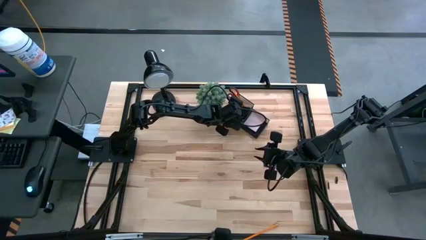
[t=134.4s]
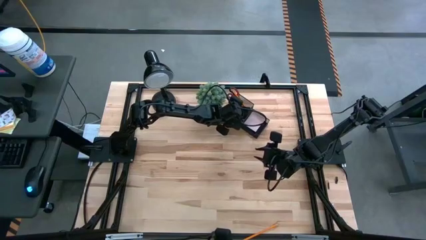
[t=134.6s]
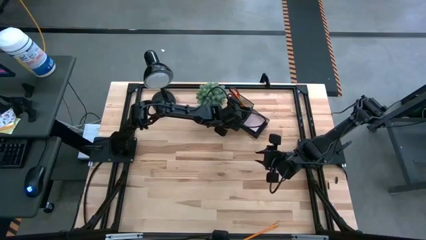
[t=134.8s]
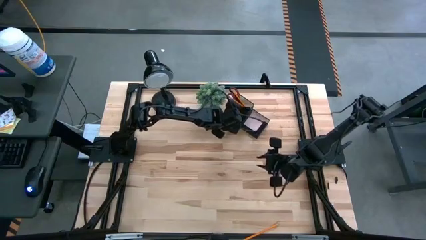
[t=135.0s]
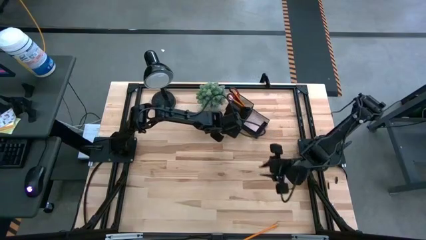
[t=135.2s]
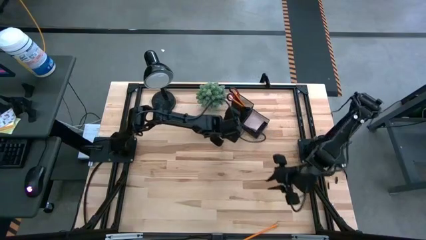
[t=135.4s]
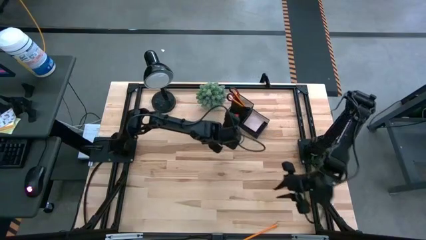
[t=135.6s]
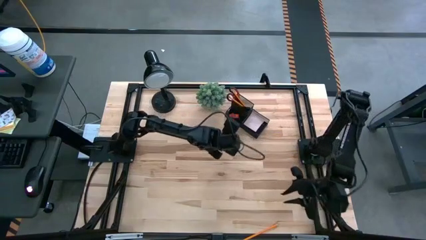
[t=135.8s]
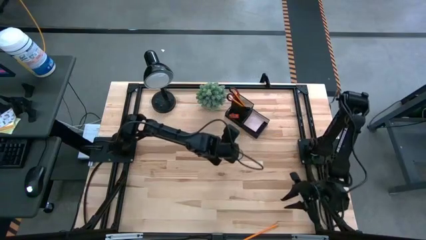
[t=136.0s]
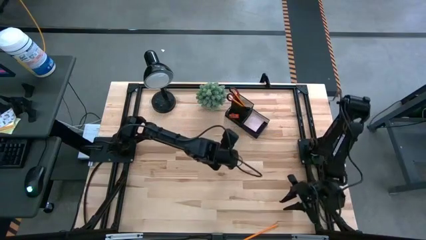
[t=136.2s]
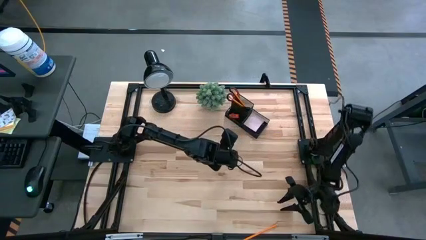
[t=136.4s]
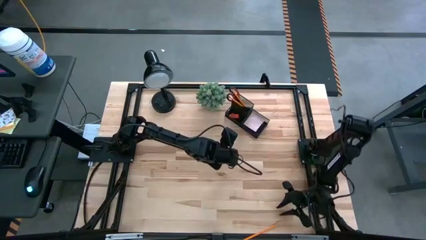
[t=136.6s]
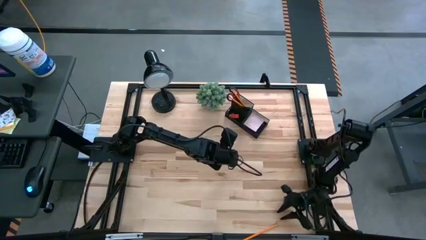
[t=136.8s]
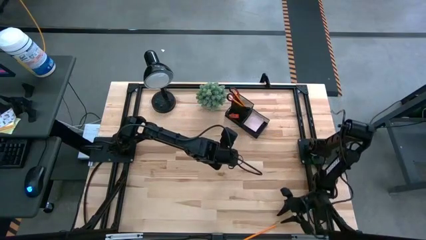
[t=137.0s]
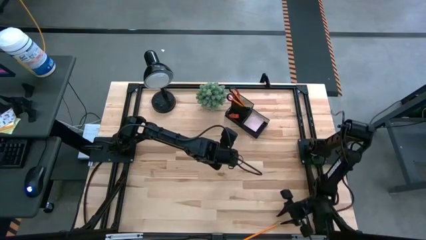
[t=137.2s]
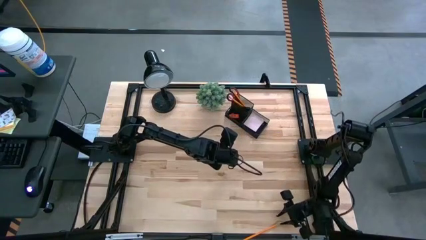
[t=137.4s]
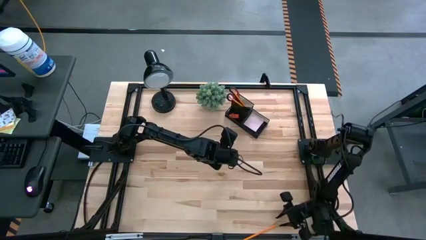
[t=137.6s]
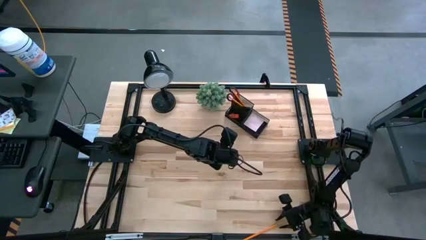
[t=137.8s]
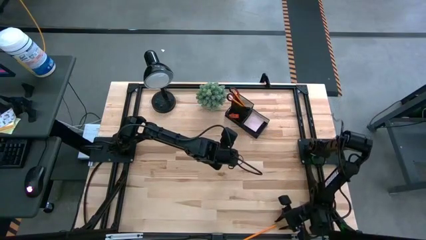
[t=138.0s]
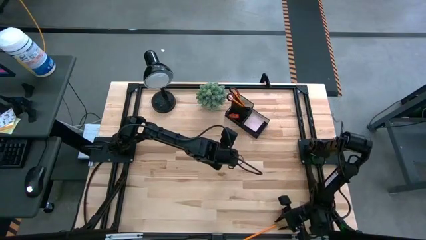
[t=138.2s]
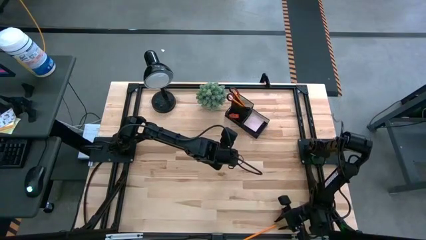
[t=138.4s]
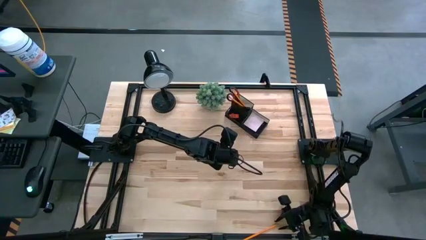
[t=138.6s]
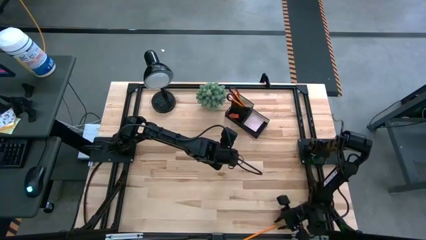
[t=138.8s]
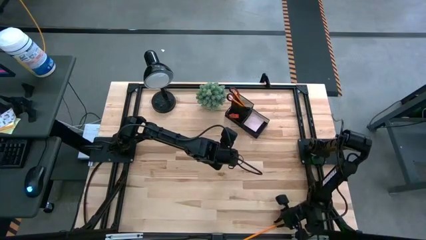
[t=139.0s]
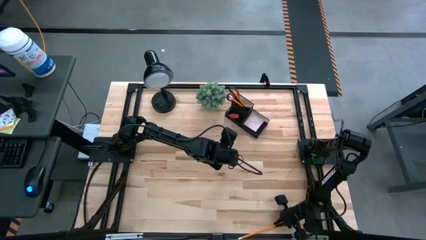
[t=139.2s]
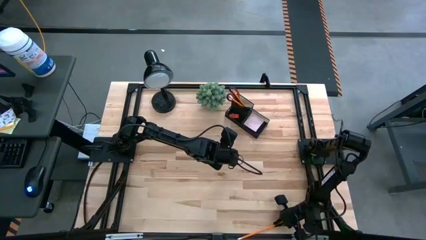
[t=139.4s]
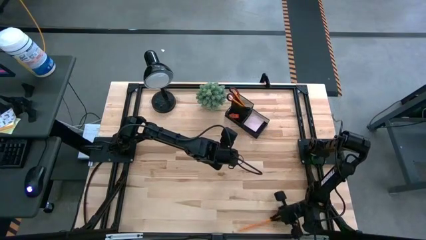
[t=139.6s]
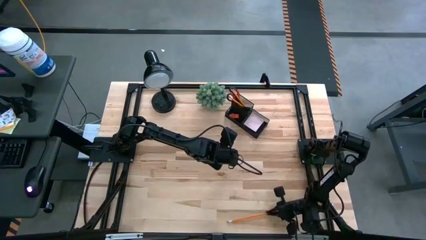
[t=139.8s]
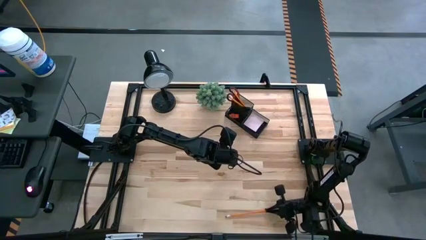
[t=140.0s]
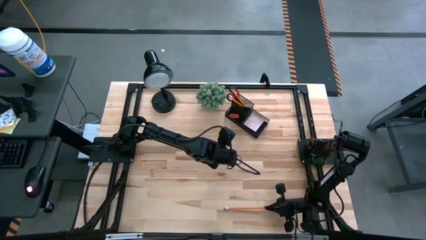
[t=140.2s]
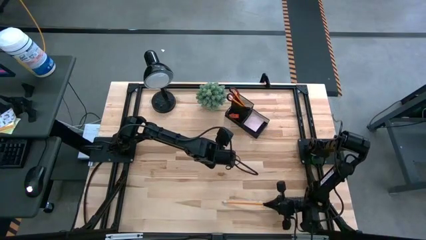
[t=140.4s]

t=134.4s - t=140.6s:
Task: Pick and place office supplies into organizer
Put the yellow pencil into the black desk organizer

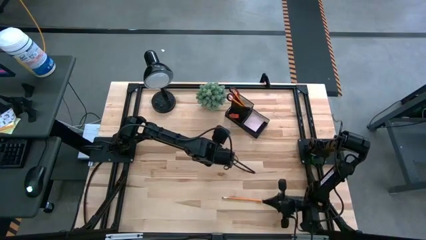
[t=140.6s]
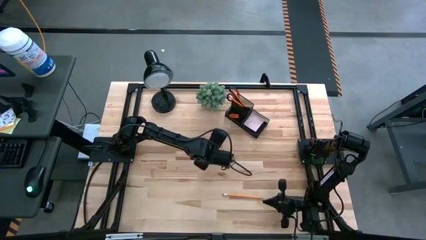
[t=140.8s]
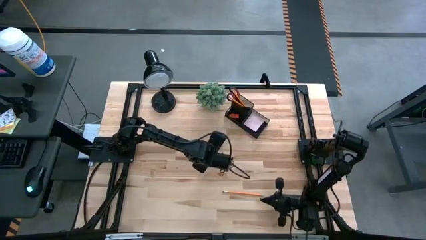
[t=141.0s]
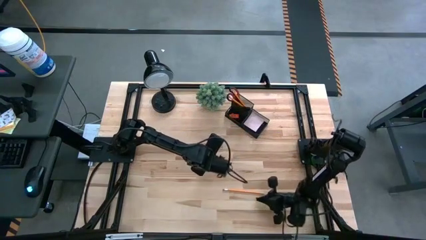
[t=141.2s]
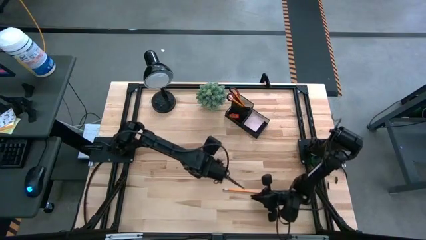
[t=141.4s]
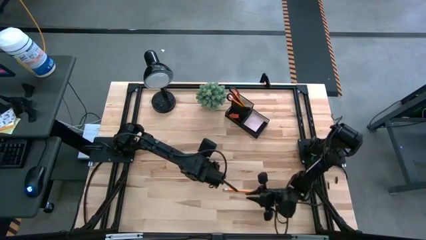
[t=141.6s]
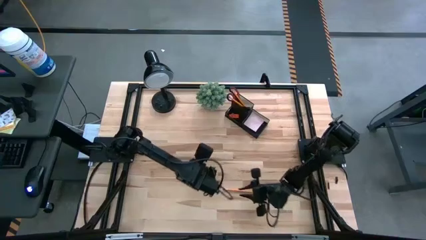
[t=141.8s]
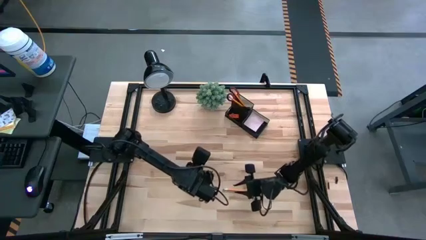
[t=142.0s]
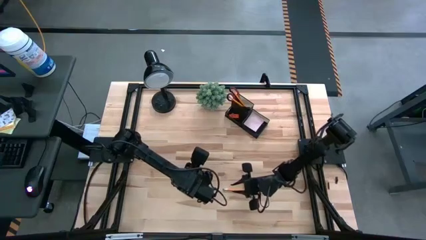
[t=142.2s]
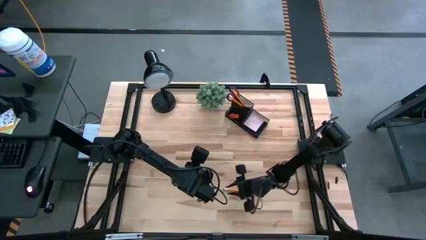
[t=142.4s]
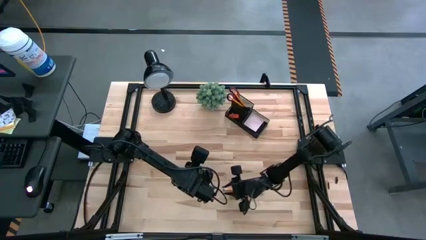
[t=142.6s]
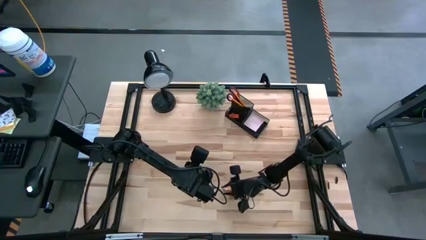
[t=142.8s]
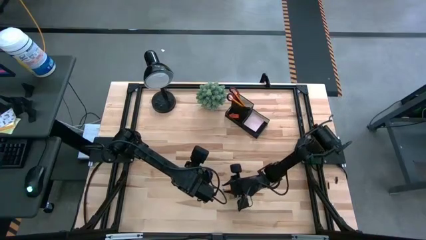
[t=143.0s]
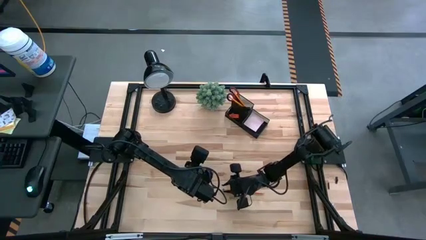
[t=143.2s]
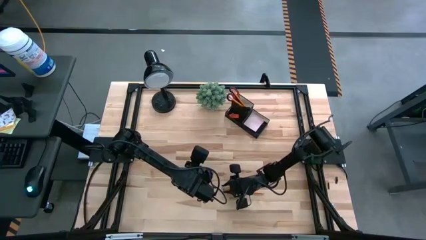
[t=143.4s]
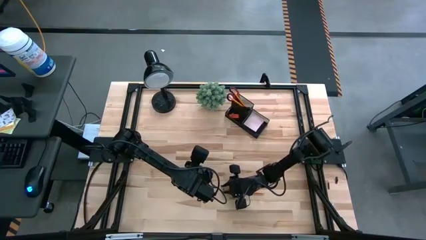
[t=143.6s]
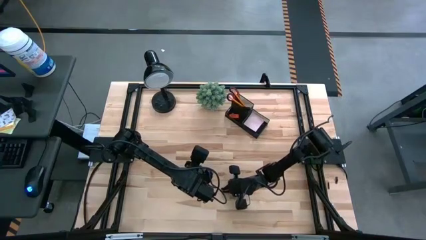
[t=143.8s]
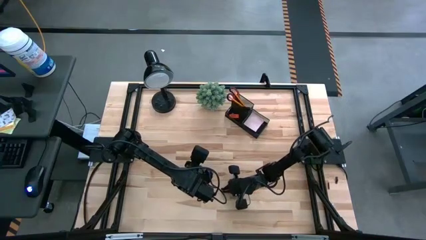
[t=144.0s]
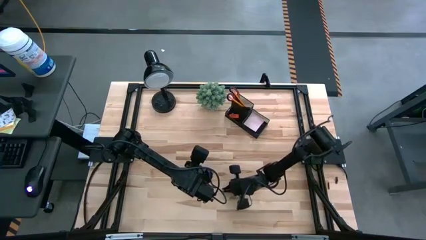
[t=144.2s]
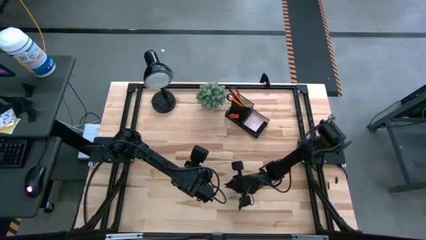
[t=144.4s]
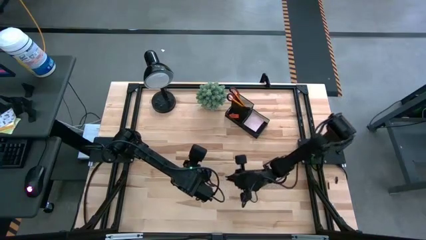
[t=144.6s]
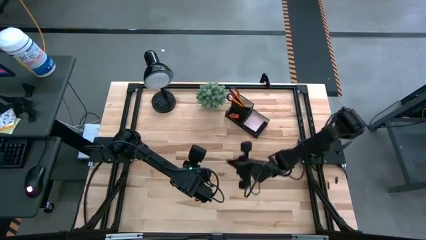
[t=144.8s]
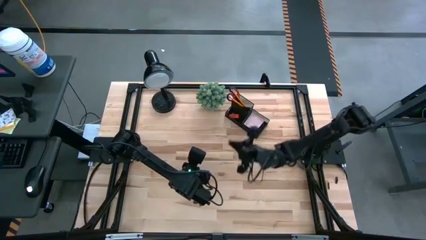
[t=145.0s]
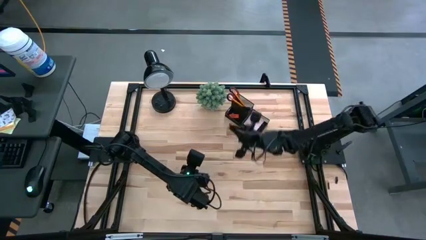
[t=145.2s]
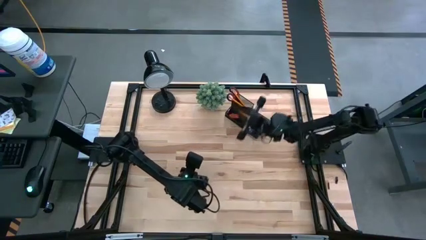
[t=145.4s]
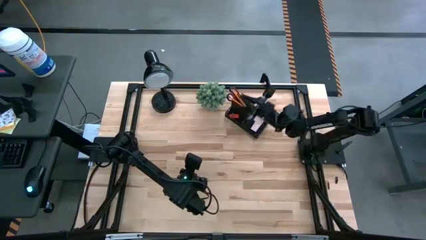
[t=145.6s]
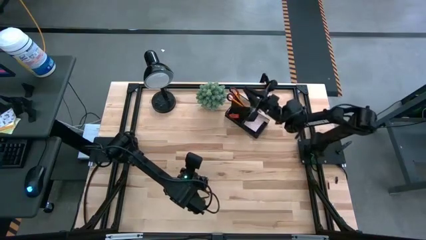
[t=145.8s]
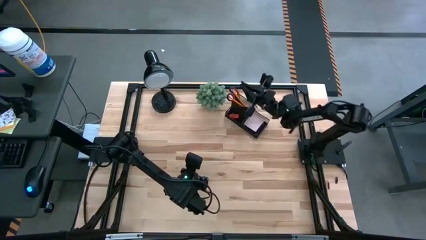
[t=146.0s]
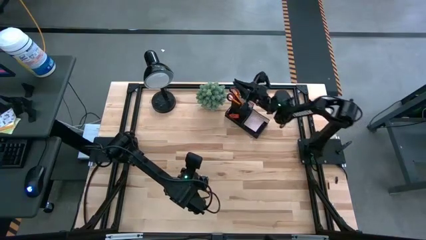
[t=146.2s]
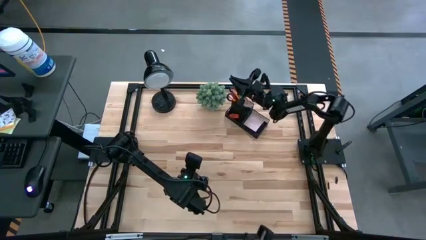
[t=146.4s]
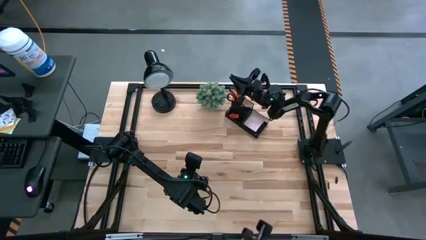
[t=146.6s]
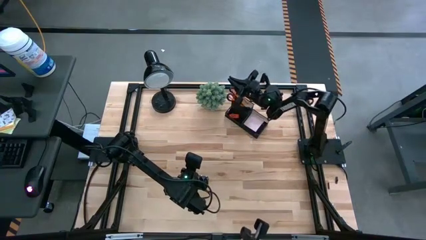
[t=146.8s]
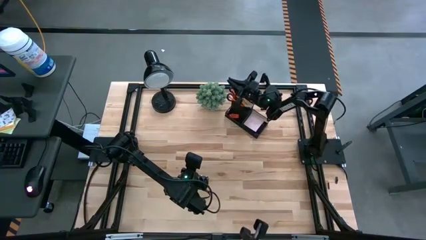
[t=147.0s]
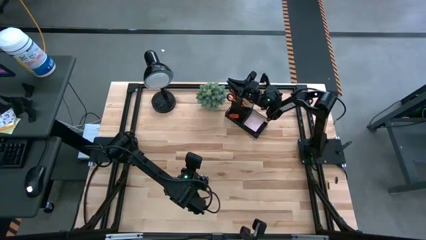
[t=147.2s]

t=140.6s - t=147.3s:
Put the yellow pencil into the black desk organizer

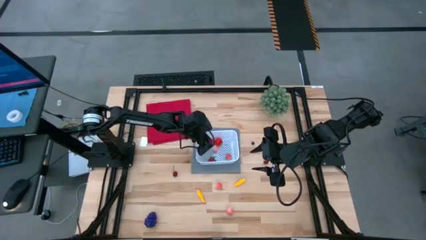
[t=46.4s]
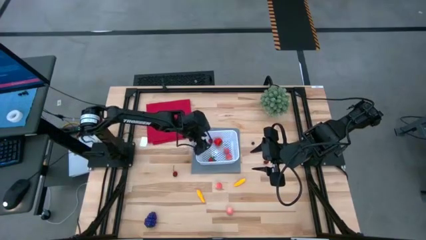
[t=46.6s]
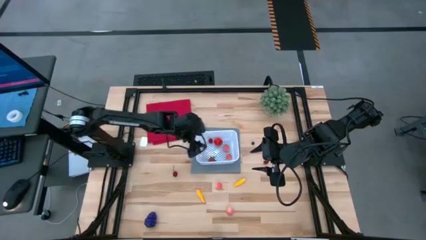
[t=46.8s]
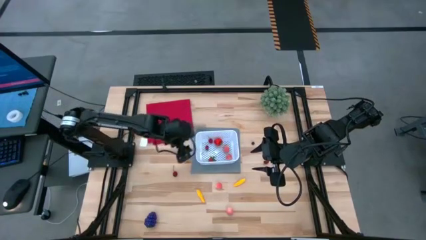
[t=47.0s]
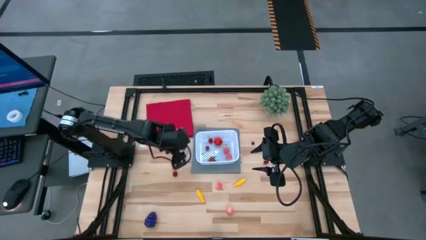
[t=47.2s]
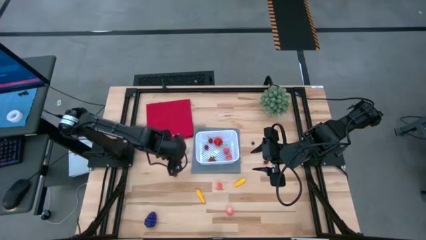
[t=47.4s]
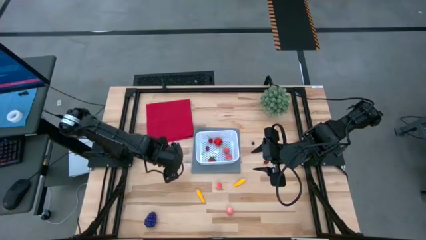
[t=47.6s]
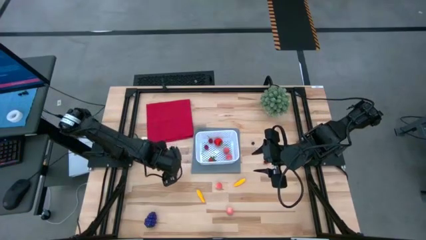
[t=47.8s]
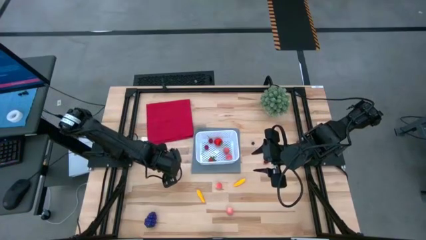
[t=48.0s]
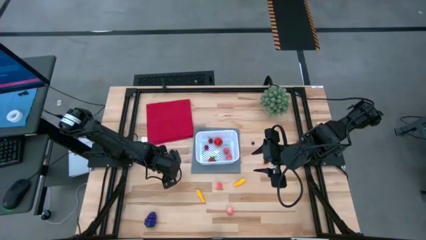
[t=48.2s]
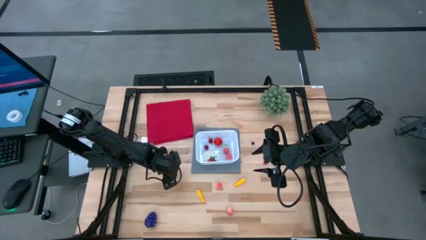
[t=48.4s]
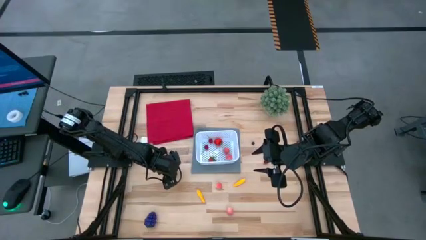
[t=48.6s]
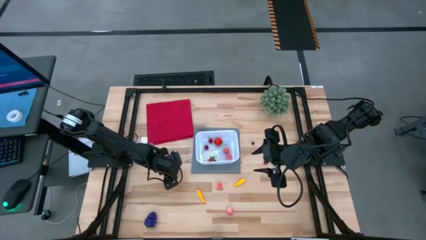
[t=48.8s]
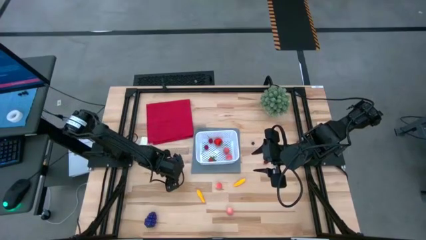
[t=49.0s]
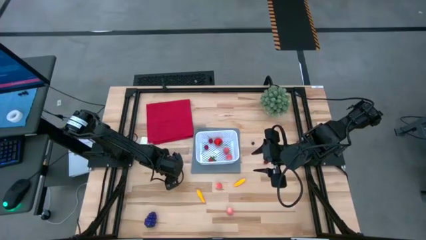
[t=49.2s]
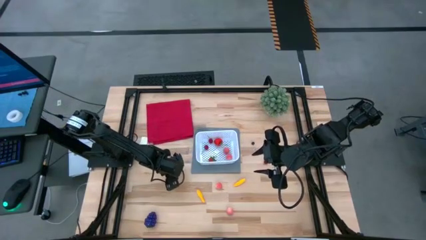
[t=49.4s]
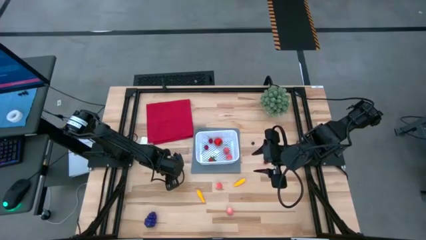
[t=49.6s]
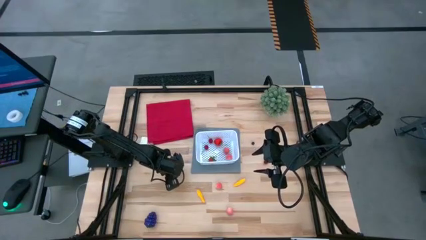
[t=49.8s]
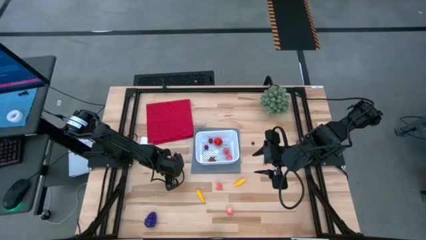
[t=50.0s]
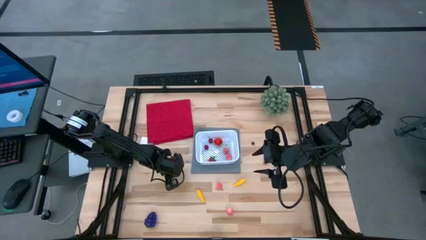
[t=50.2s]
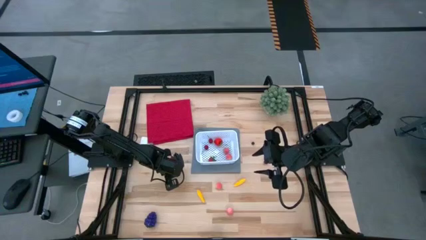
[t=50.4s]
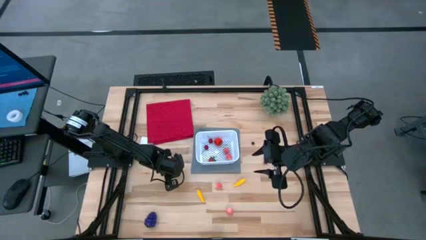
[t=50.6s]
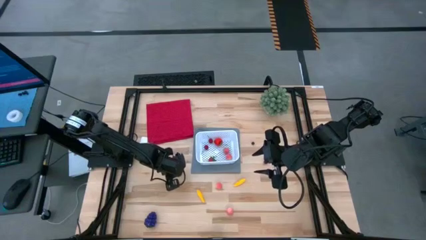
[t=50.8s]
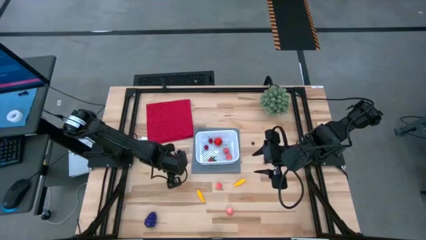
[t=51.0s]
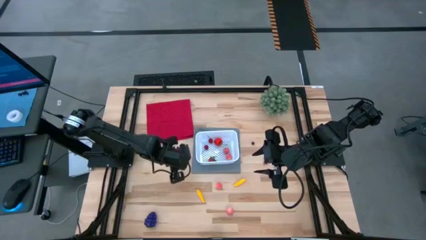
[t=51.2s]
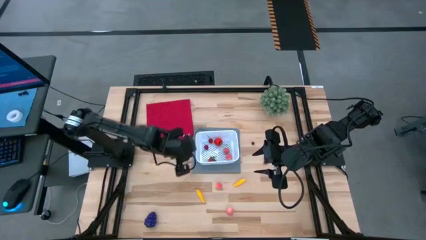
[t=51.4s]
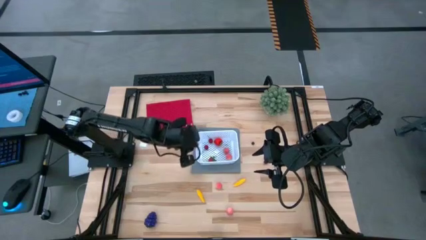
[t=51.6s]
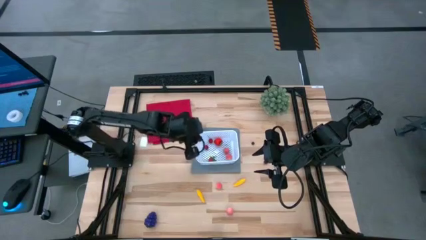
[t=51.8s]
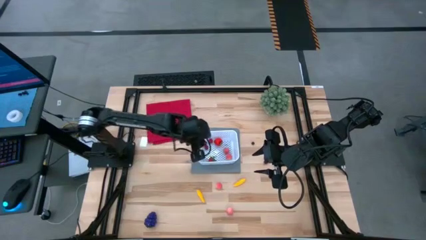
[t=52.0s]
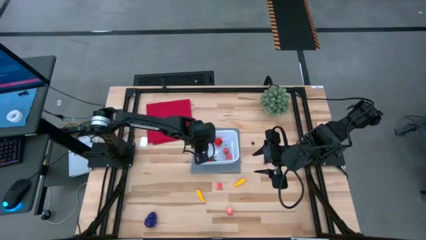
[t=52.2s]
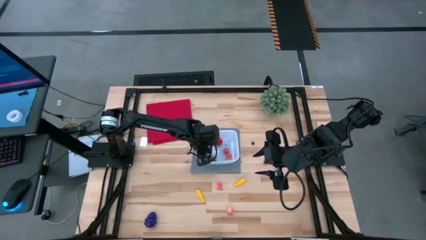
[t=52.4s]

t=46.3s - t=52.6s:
Task: Pick and placing Produce into tupperware
Put the left cherry into the white basket
